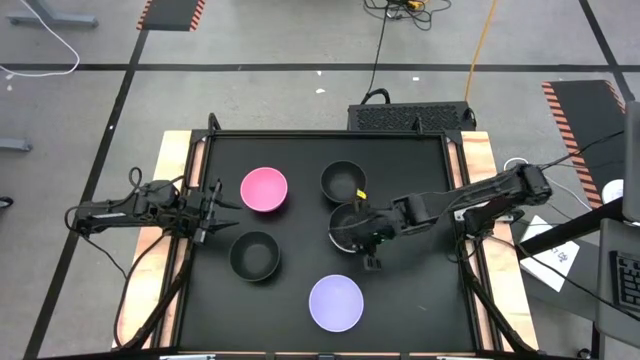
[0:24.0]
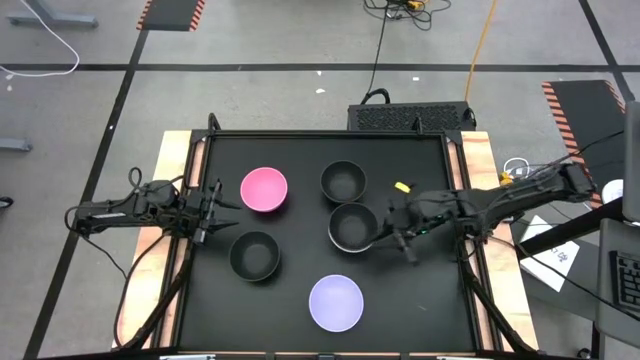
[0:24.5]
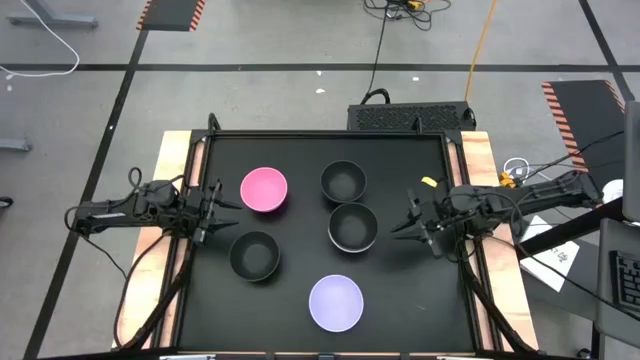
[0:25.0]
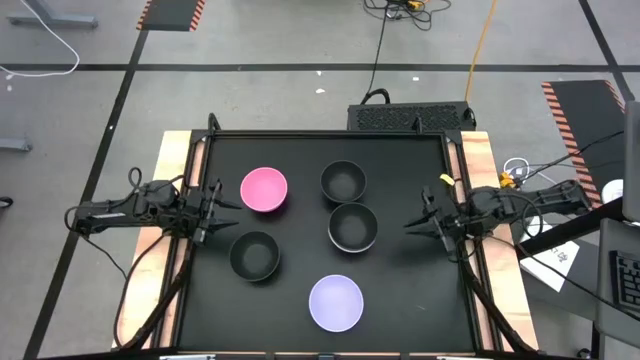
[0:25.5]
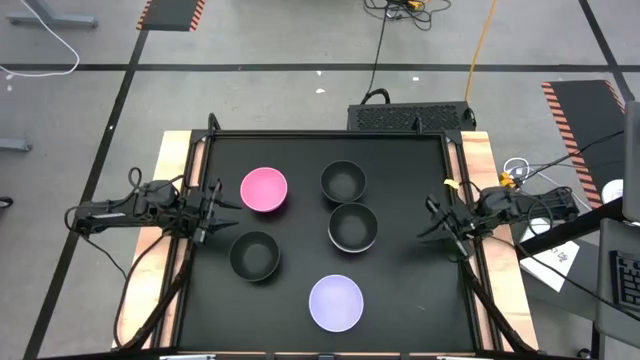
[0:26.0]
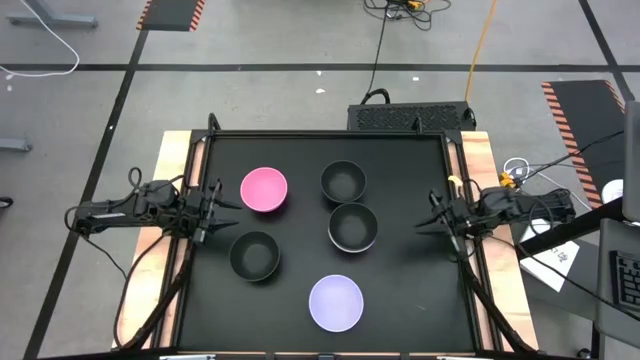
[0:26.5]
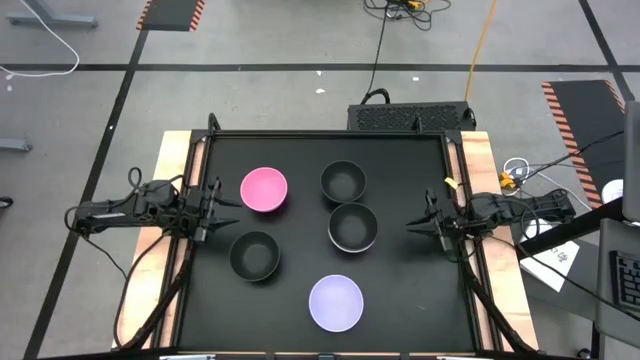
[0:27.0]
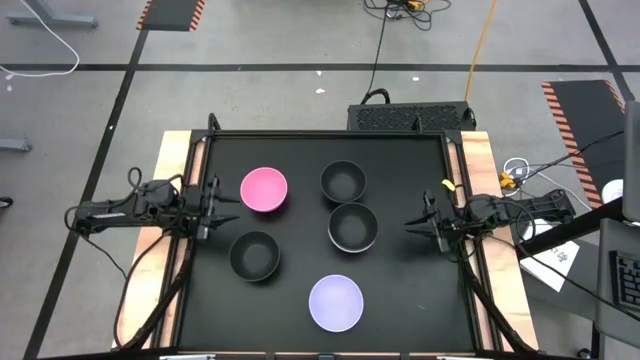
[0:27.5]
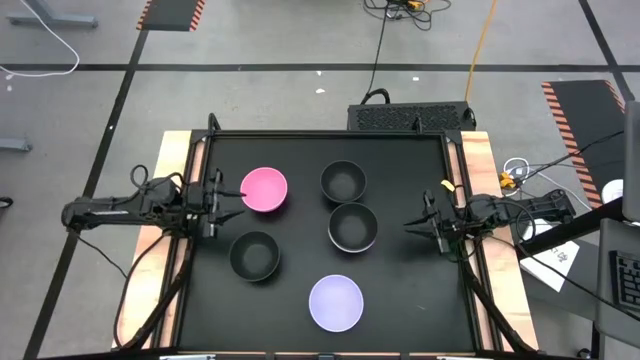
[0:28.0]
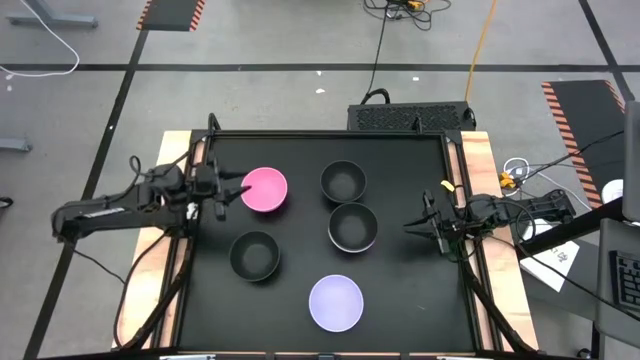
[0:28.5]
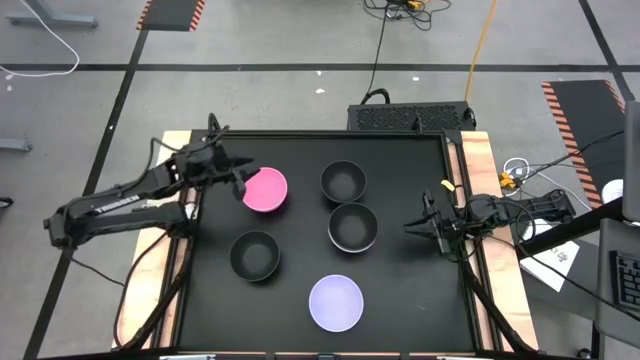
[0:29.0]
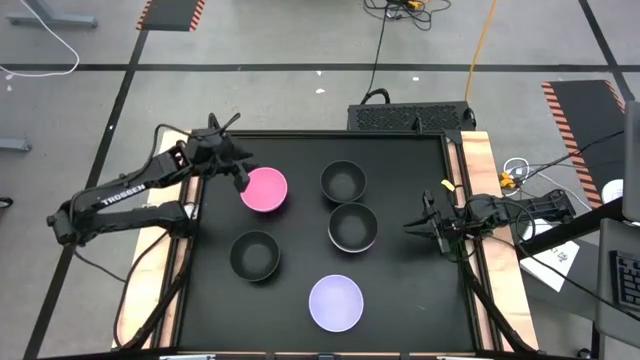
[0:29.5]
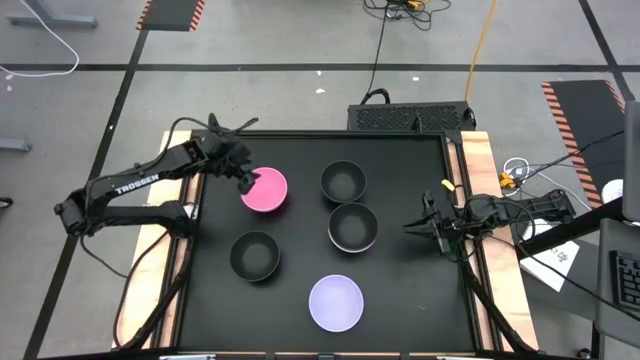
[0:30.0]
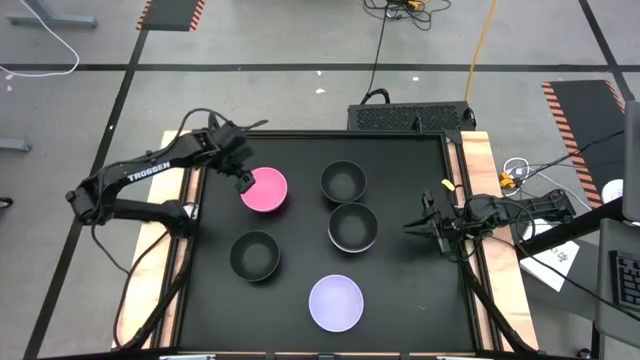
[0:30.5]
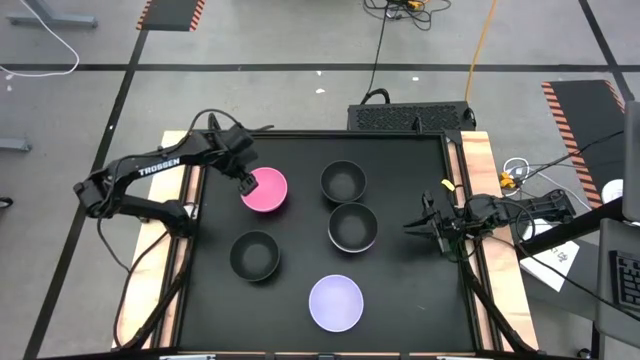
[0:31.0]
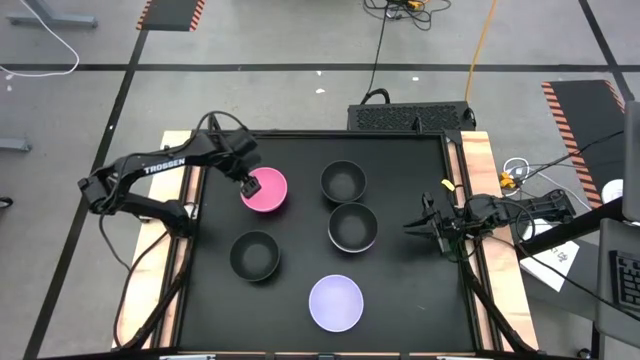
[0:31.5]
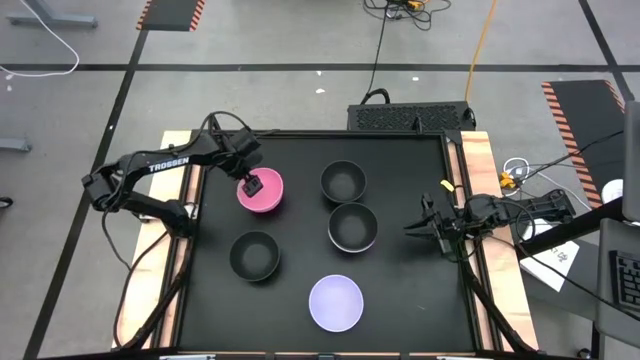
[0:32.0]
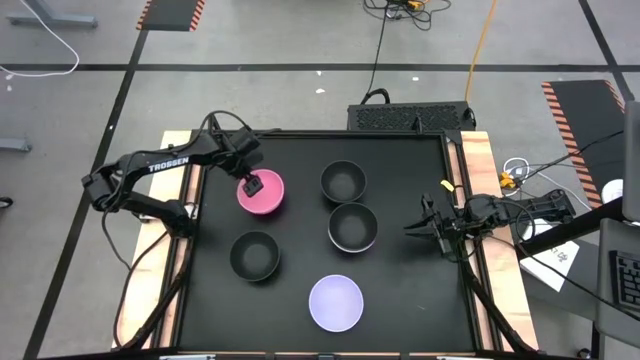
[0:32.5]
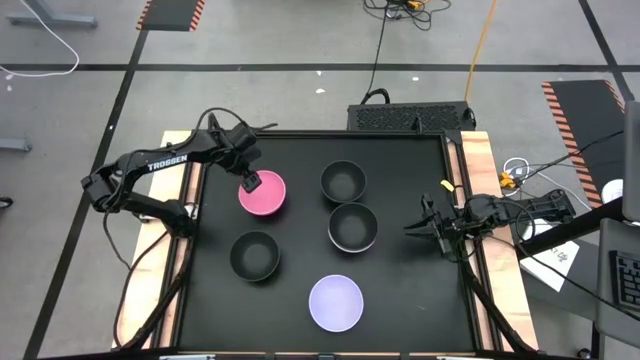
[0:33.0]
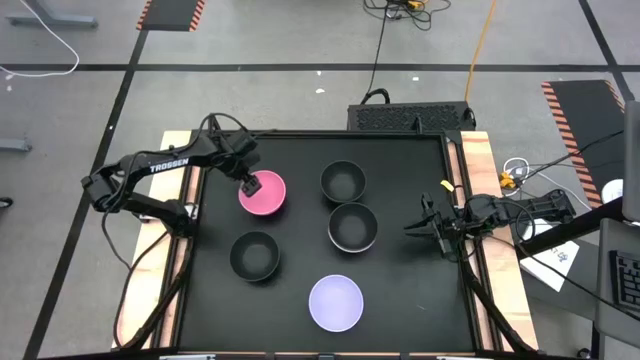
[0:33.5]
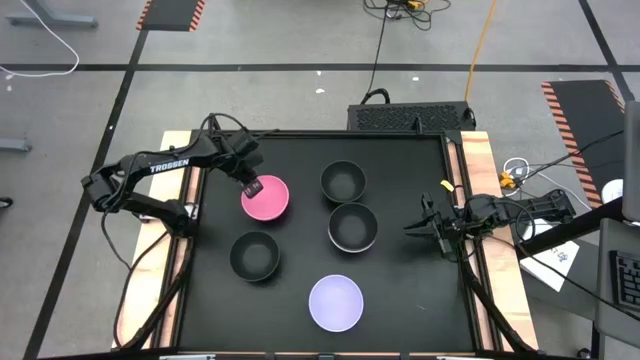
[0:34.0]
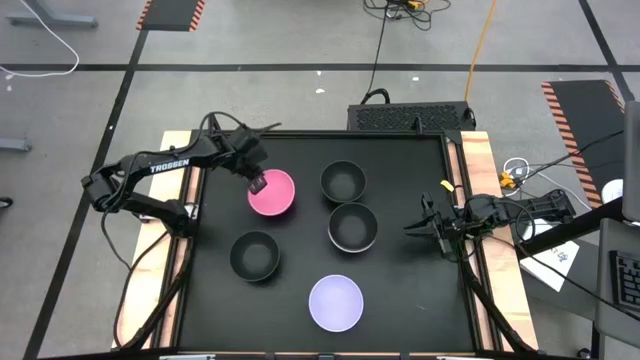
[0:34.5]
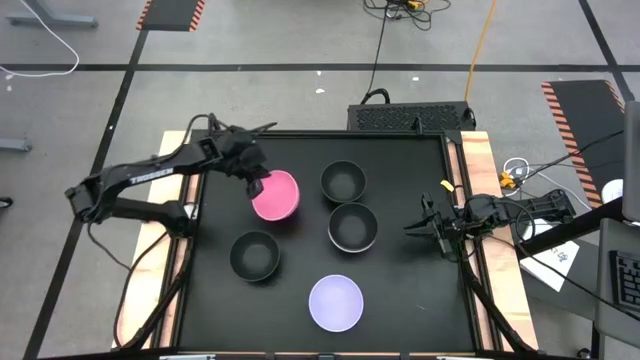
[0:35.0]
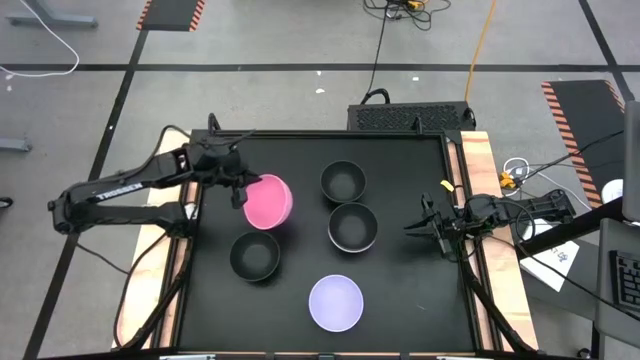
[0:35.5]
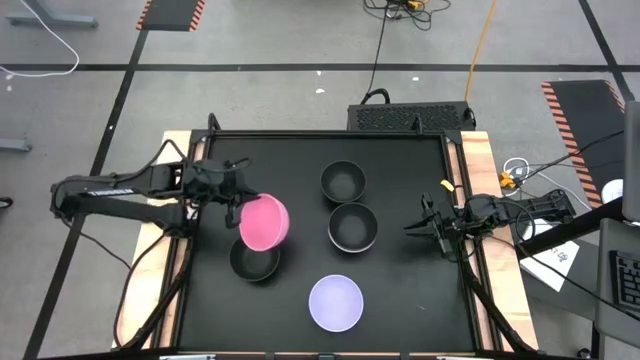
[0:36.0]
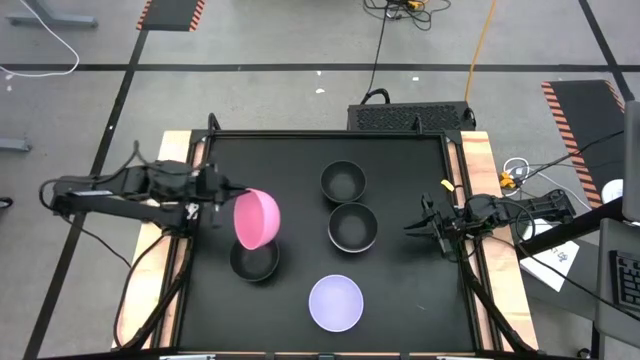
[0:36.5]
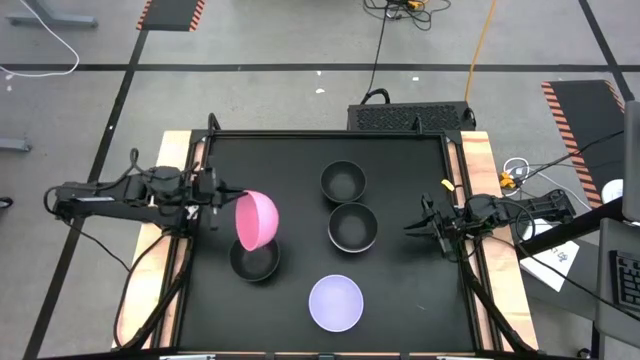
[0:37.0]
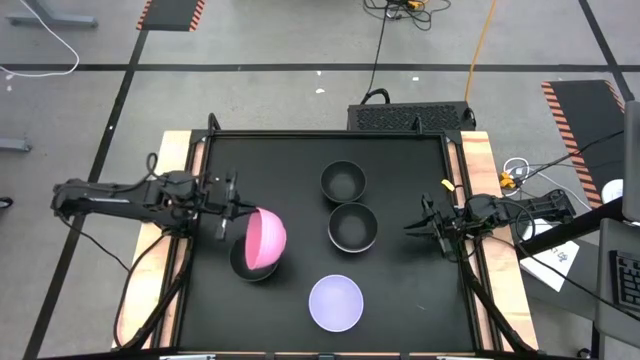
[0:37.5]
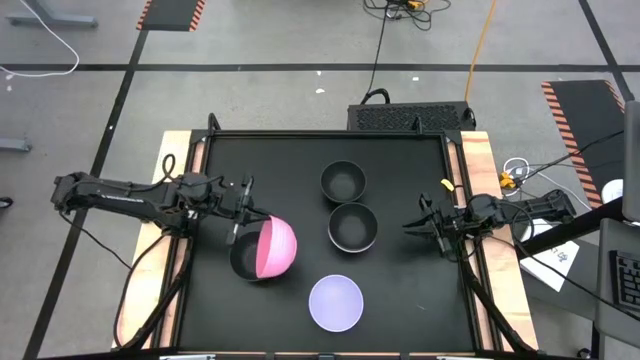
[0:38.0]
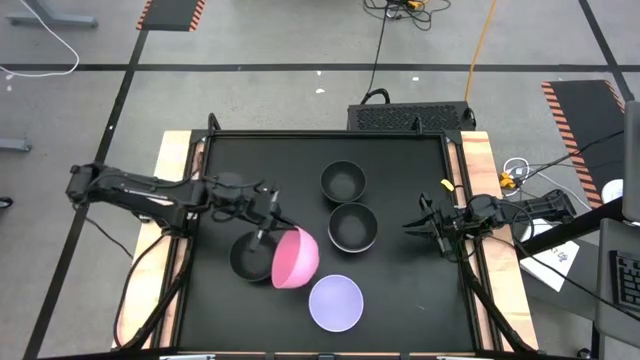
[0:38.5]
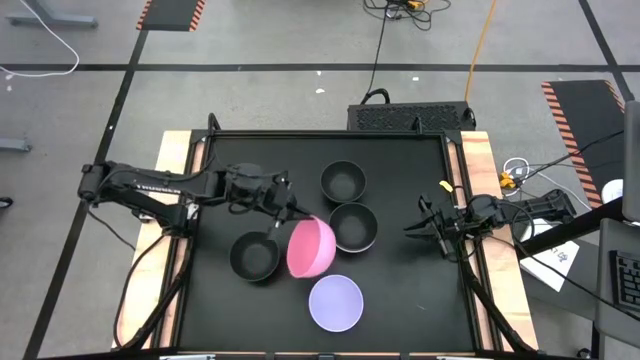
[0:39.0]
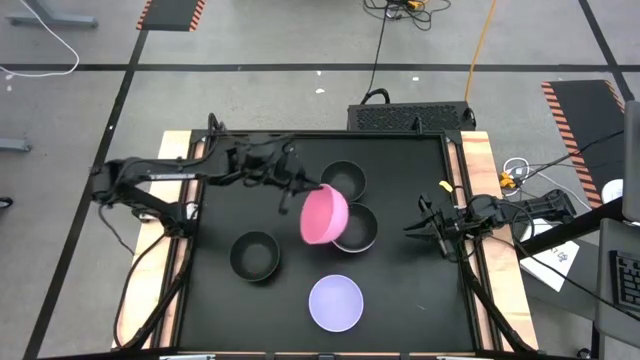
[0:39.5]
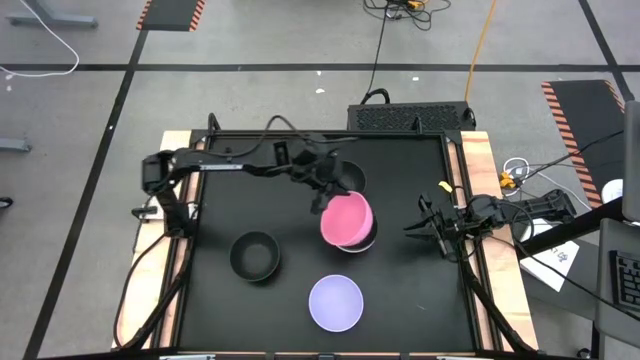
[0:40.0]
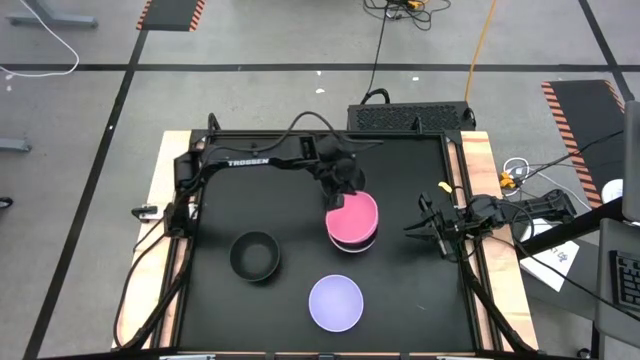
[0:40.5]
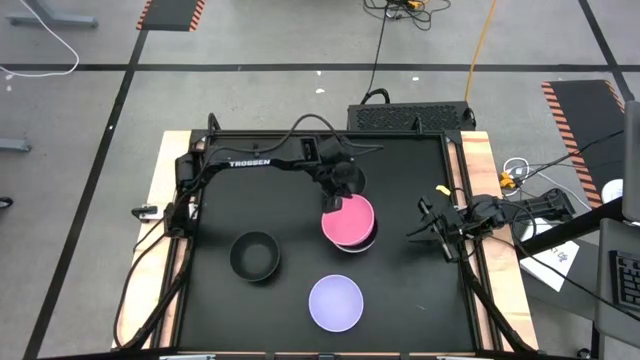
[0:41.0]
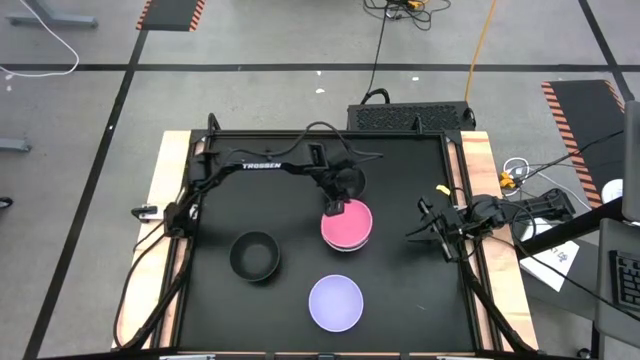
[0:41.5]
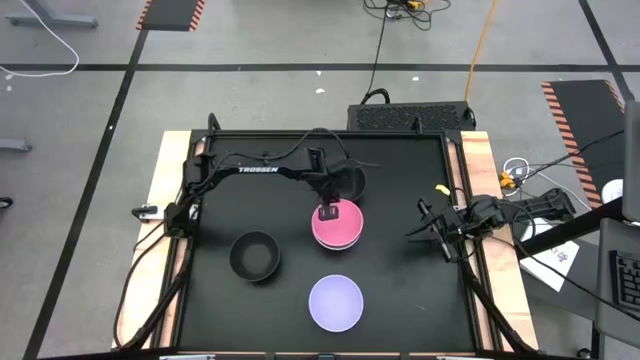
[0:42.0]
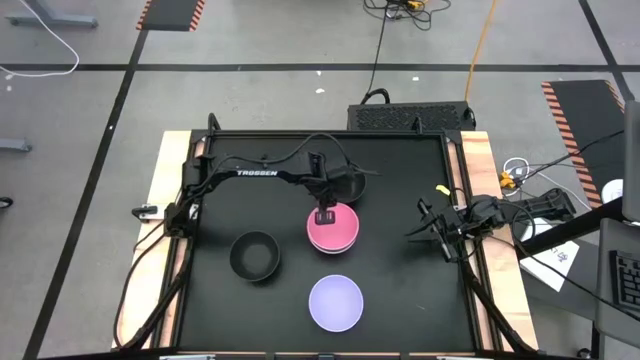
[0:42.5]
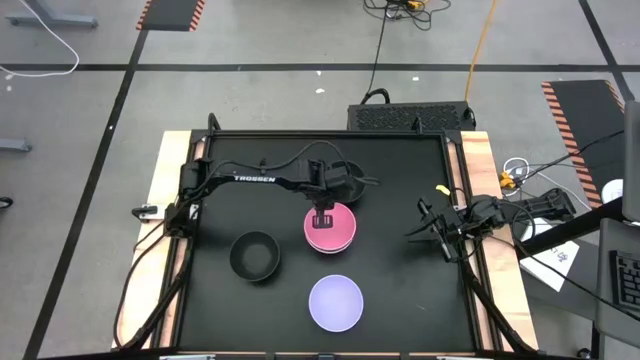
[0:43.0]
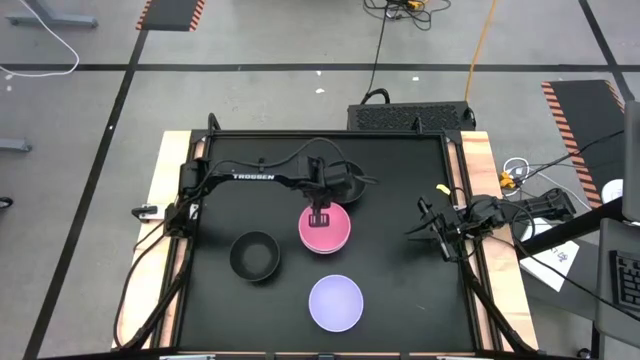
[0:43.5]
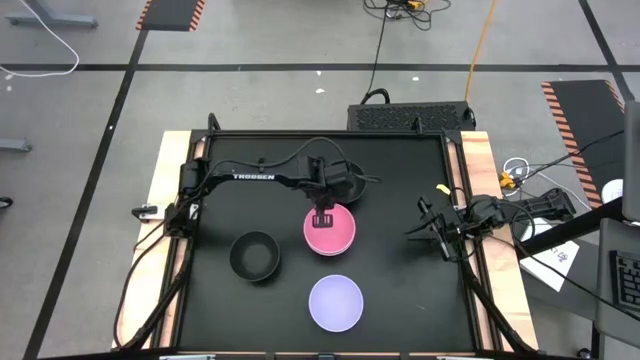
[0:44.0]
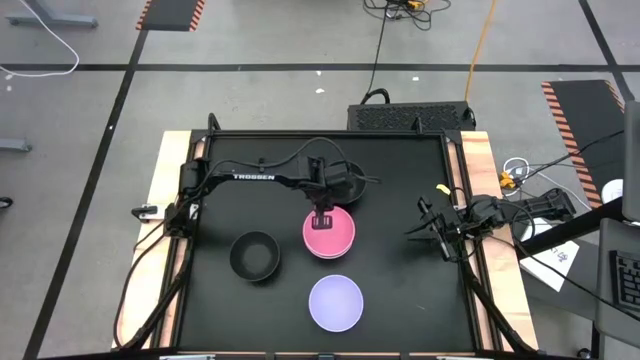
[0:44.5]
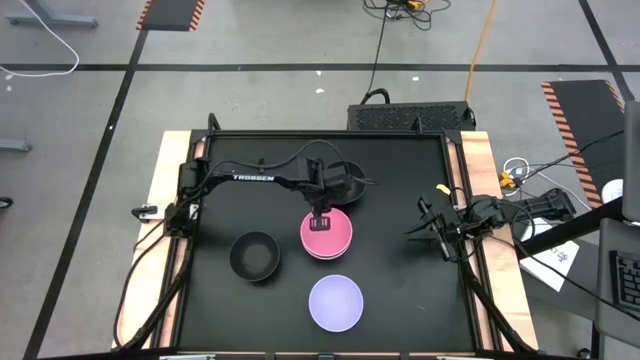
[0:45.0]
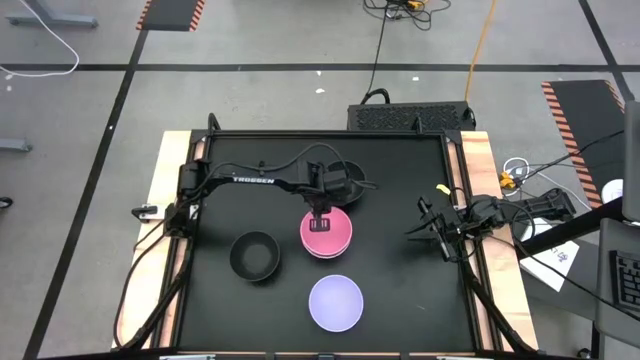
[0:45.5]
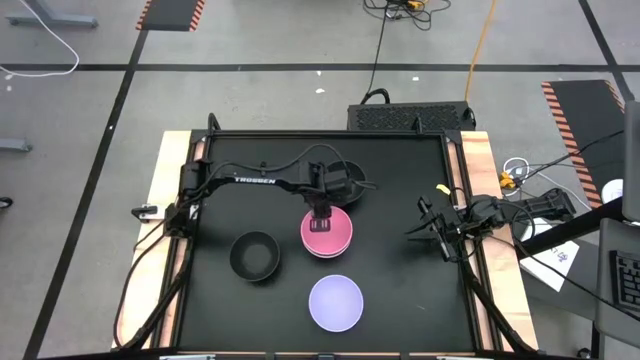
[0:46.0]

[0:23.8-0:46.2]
Task: Nest bowls inside each other
Stack the pink bowl on top of the black bowl
